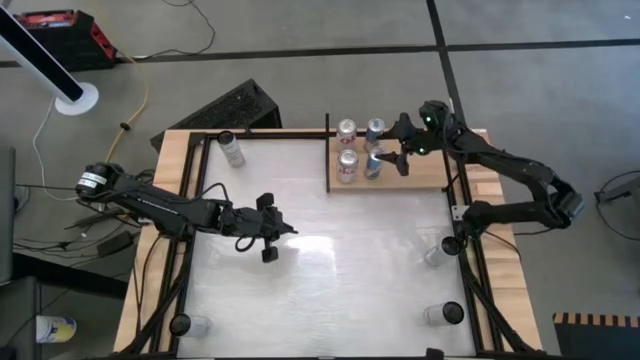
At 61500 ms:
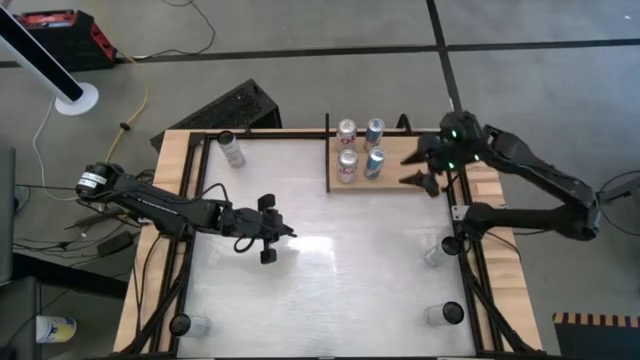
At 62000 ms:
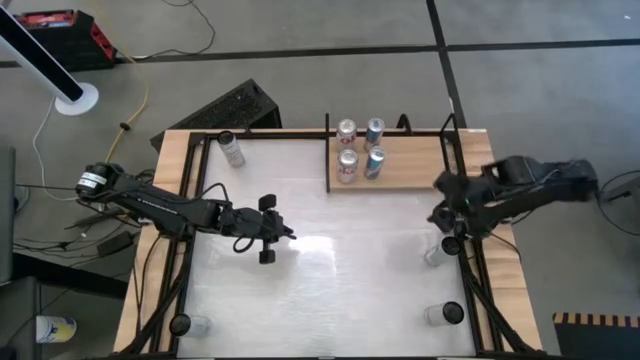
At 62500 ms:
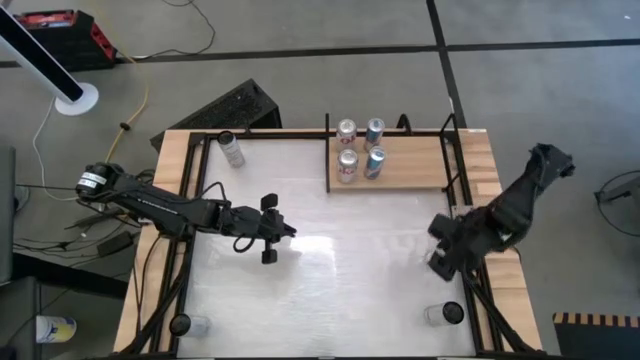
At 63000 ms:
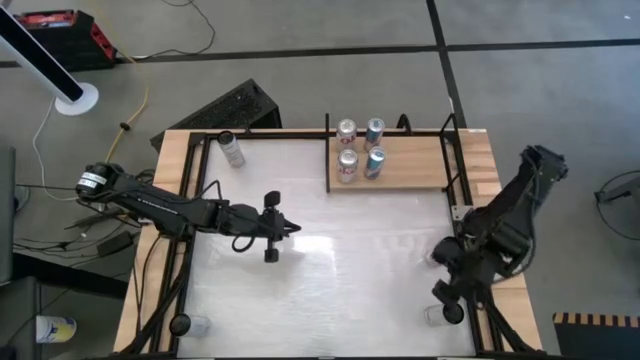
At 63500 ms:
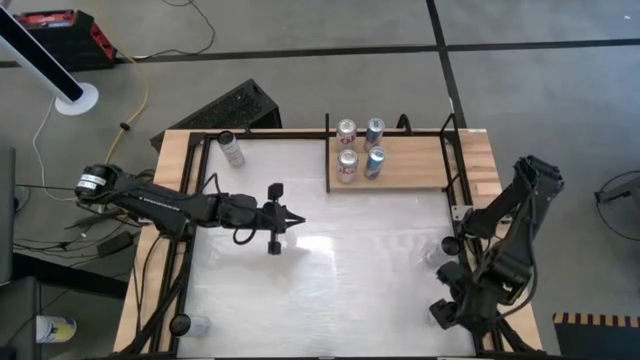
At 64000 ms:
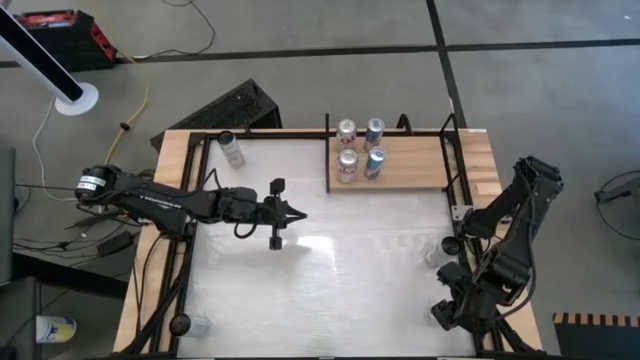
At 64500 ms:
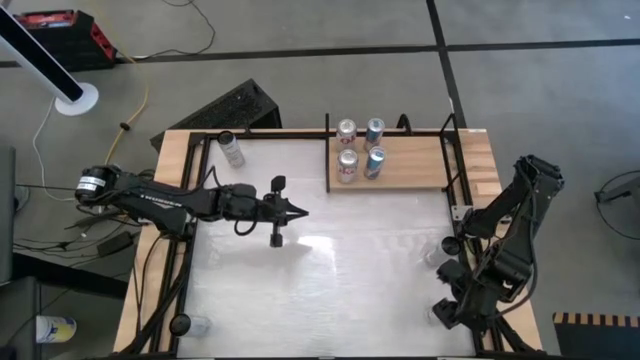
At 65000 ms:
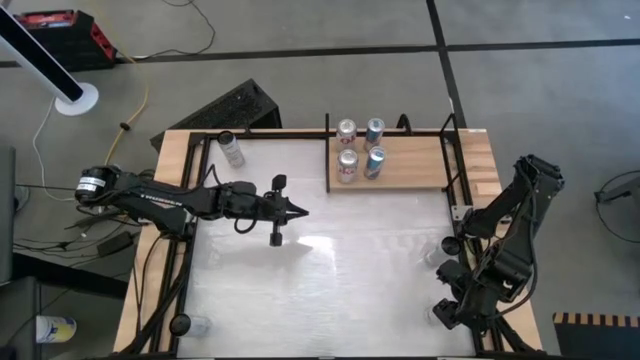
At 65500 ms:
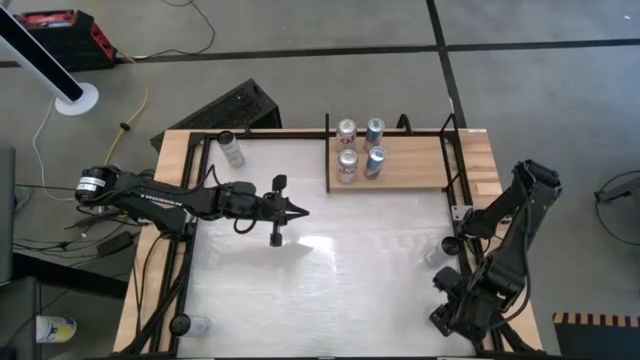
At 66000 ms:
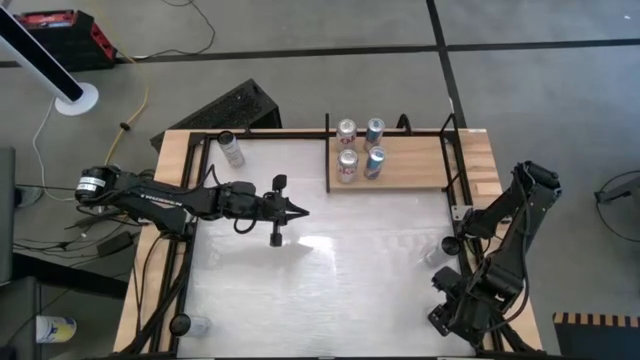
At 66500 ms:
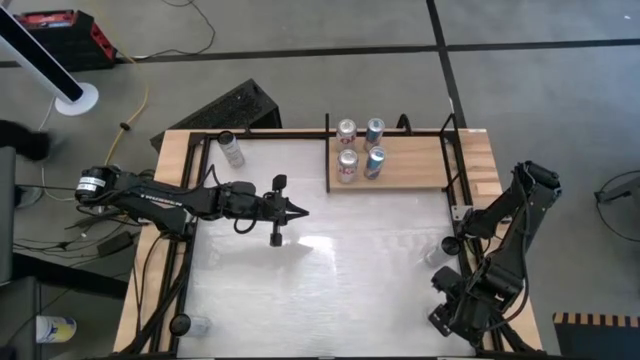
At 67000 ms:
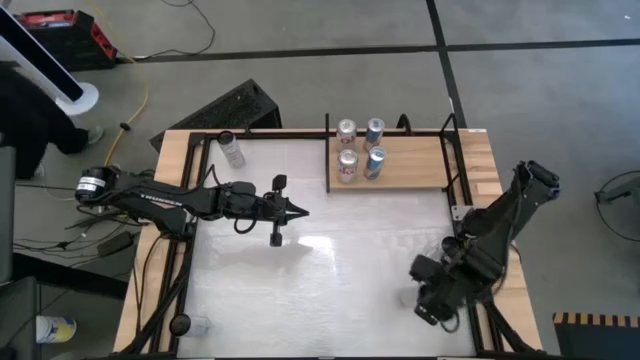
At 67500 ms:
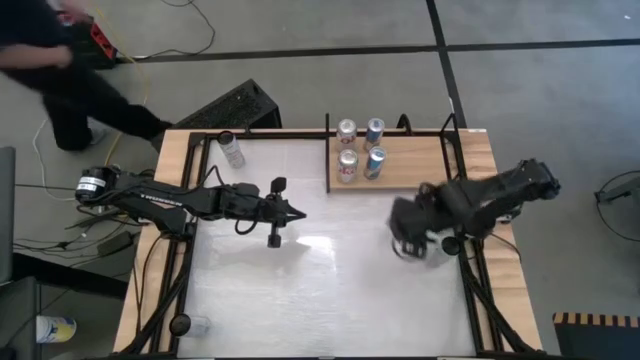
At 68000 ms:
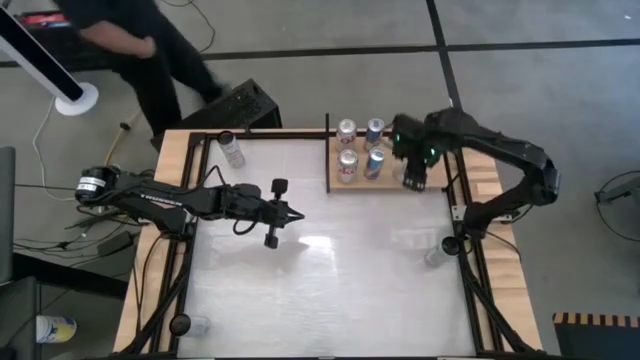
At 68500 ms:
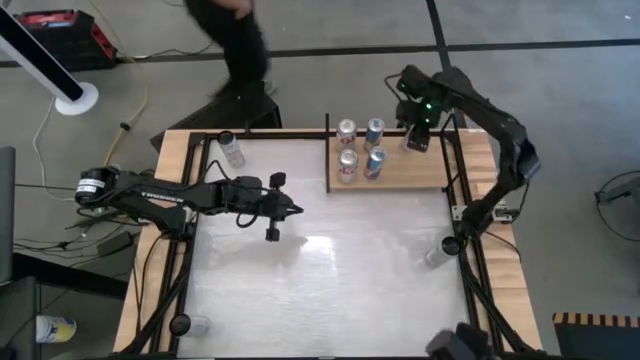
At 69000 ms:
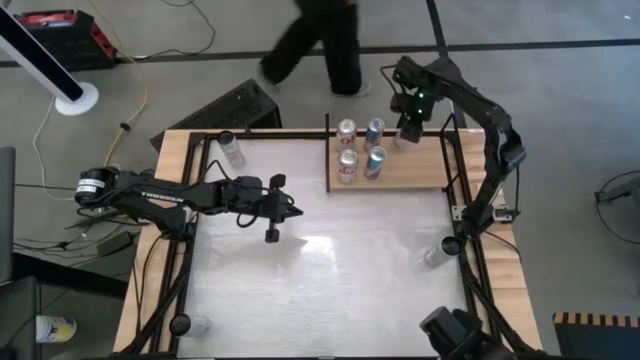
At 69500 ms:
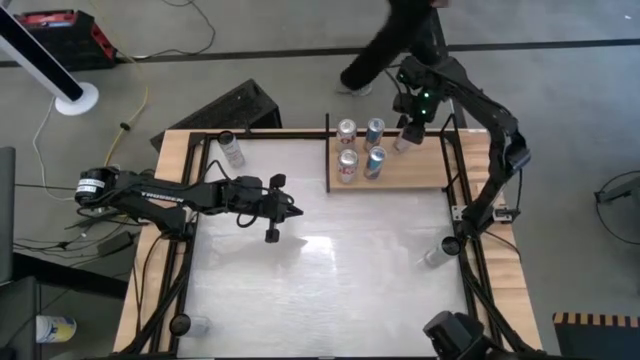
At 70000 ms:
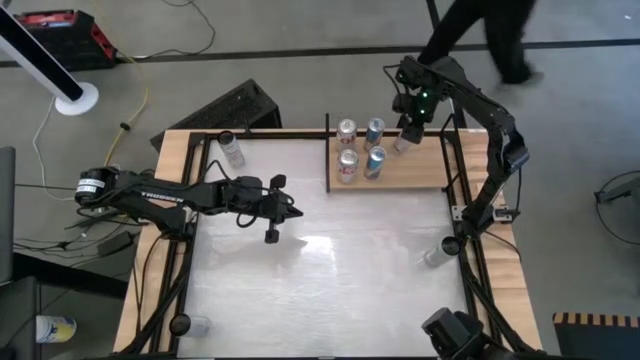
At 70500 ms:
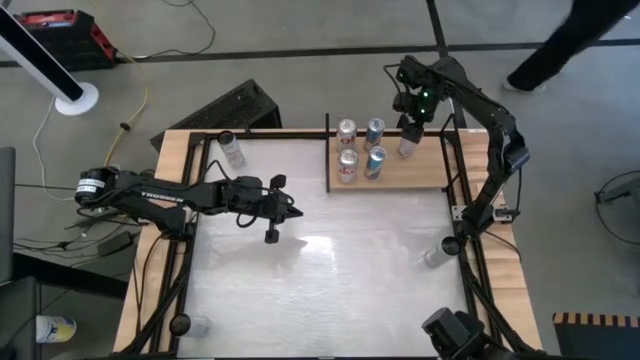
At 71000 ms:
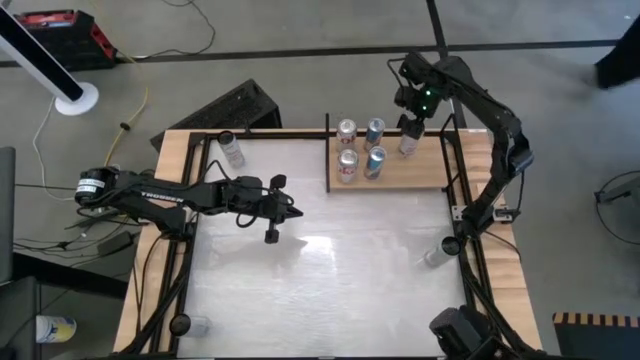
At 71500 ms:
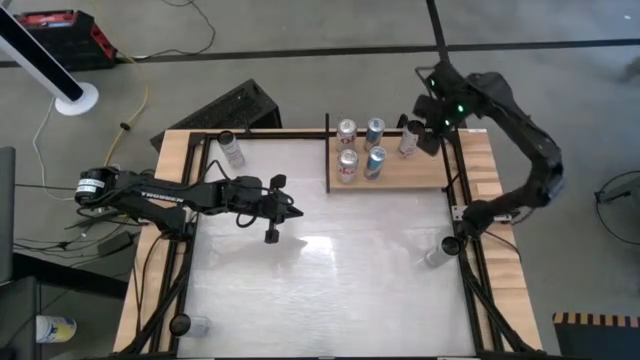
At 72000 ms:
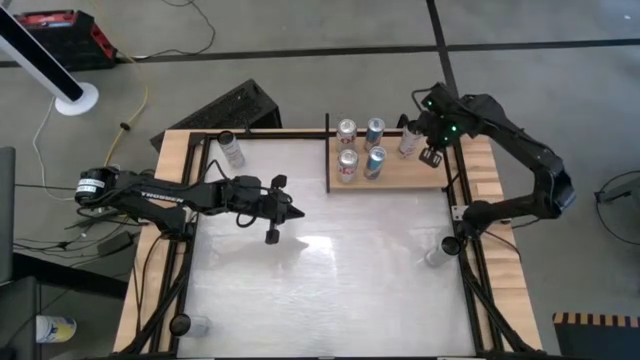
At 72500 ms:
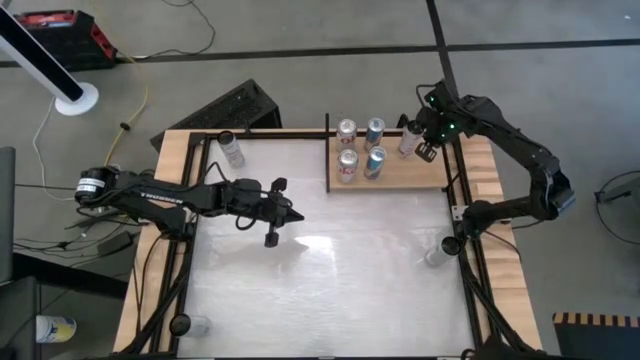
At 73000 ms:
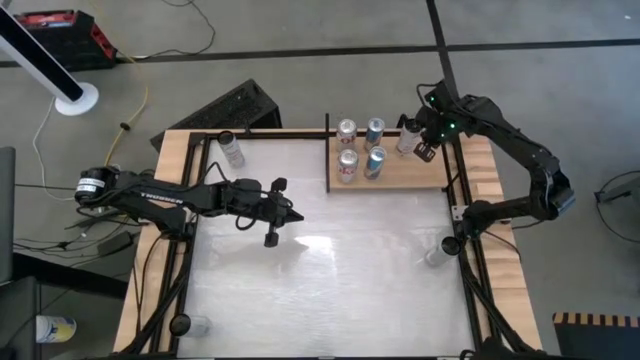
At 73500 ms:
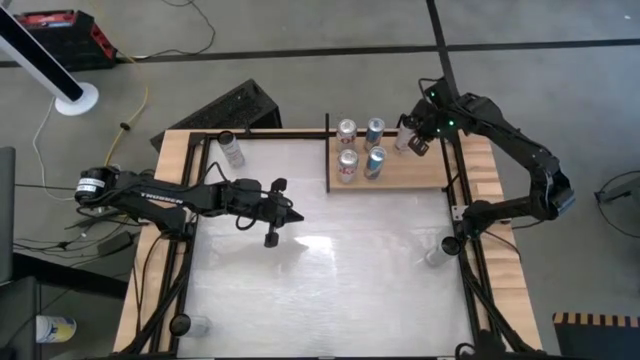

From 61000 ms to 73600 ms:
Task: Place canned beverage on shelf
Put the bottom white-pink soda can on the shelf

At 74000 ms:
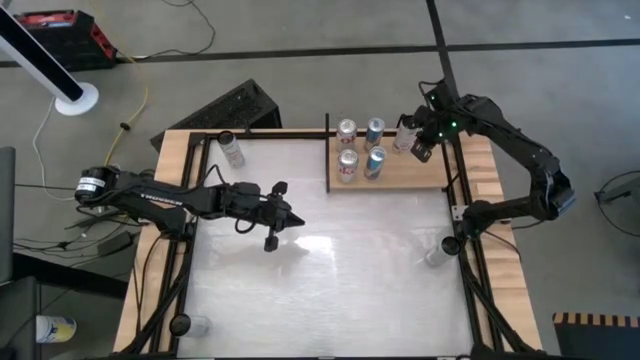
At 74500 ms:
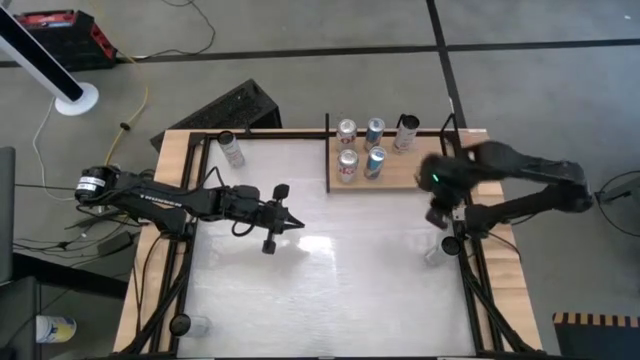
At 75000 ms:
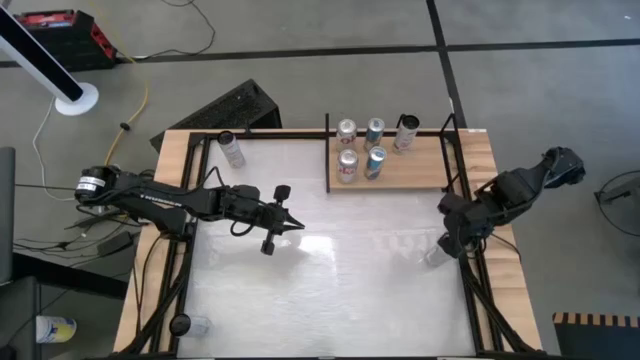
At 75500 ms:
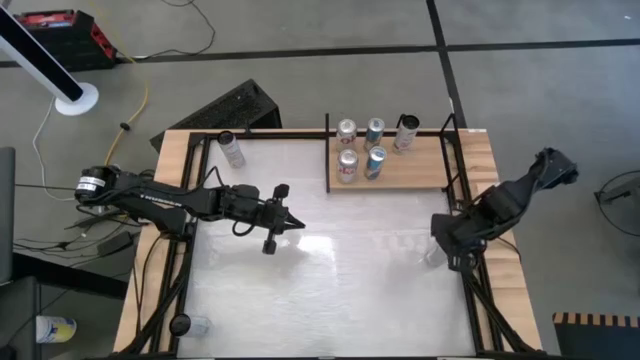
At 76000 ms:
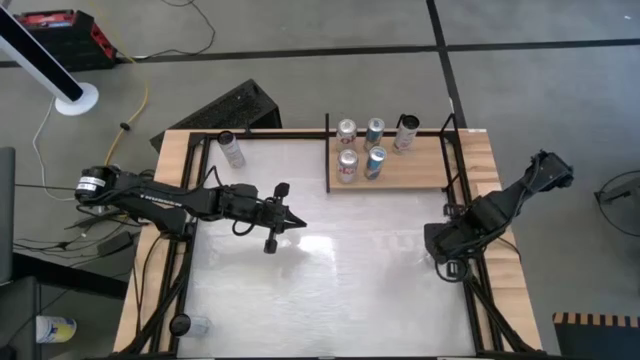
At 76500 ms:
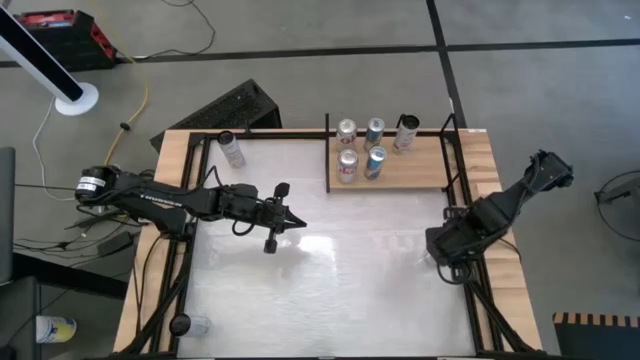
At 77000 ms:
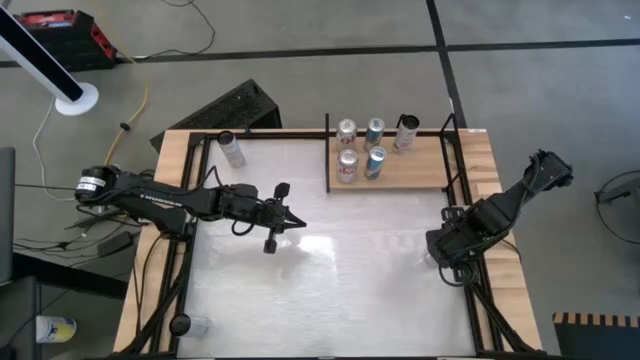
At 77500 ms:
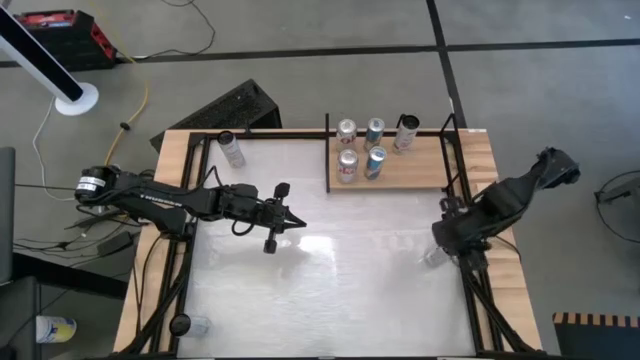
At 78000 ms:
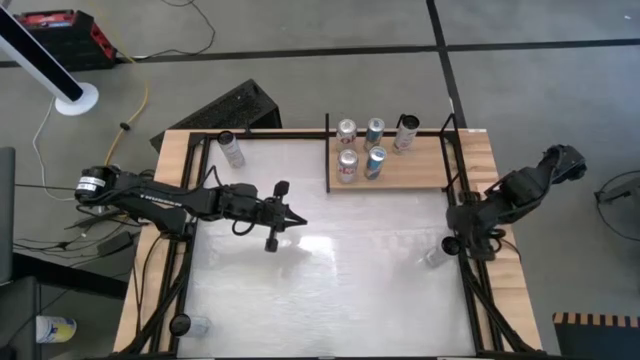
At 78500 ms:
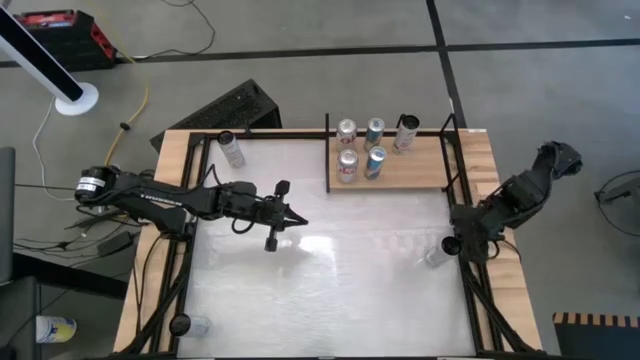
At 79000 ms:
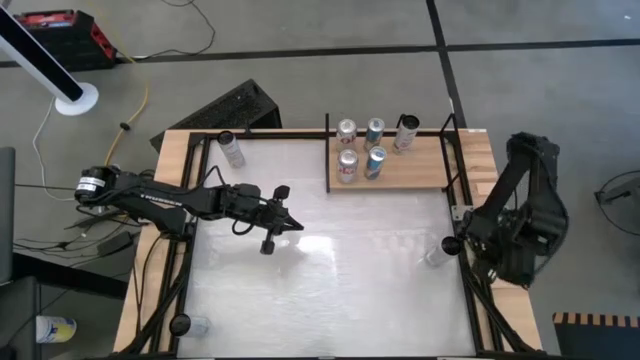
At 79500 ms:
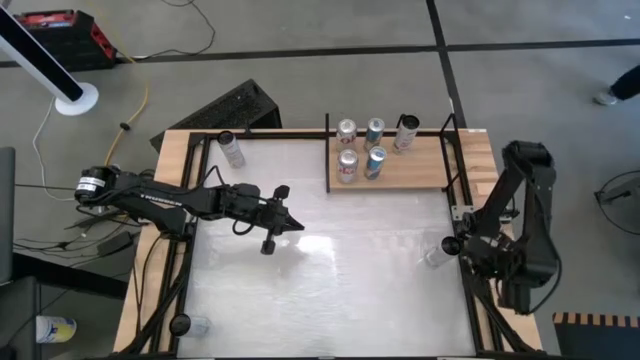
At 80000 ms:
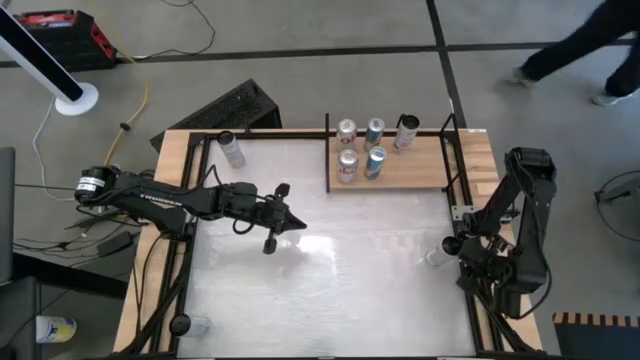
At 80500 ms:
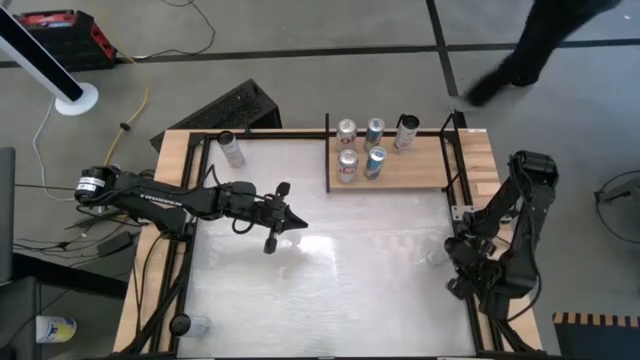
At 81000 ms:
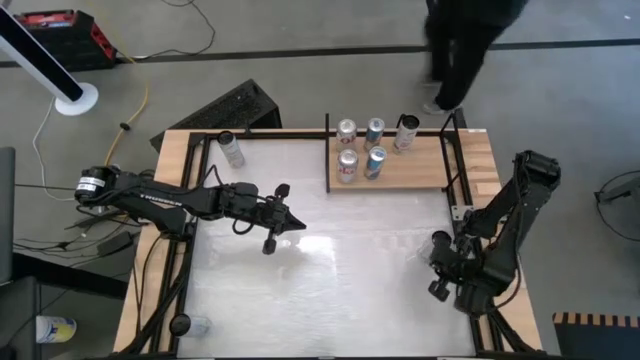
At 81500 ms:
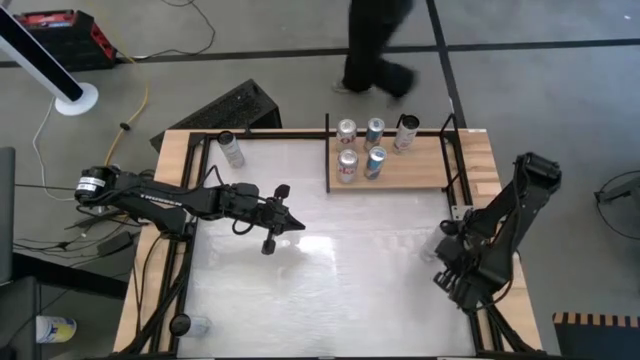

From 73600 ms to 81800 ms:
Put the white-pink soda can aligned with the other white-pink soda can on the shelf
